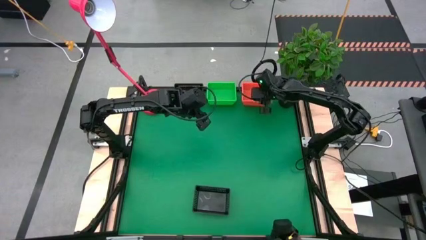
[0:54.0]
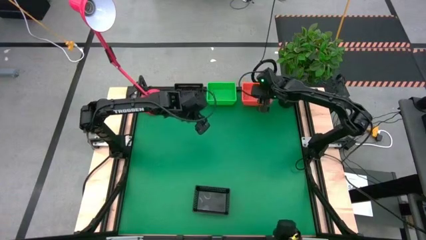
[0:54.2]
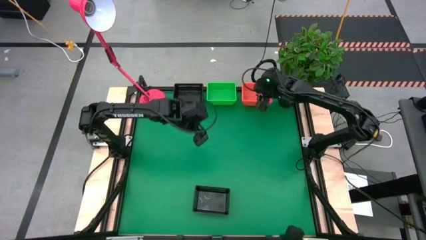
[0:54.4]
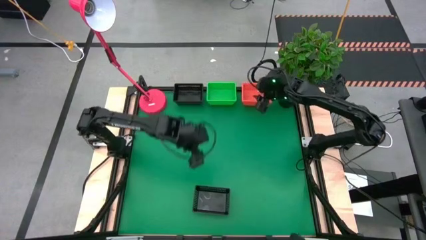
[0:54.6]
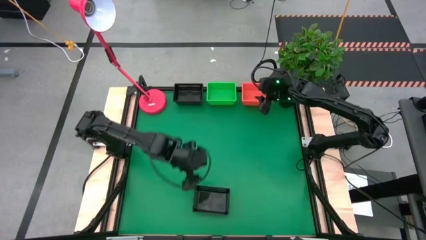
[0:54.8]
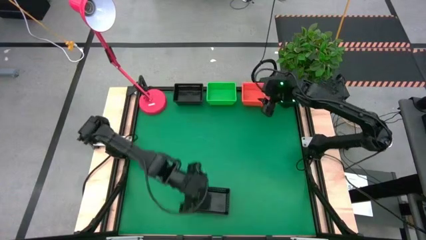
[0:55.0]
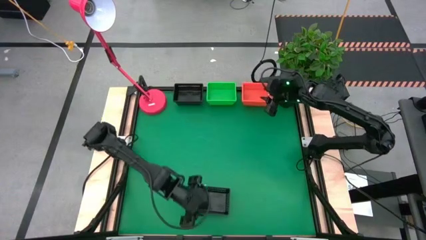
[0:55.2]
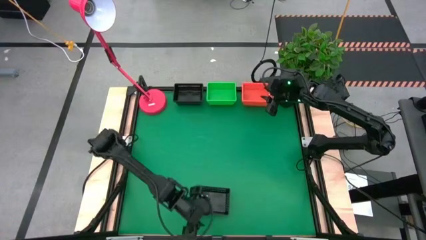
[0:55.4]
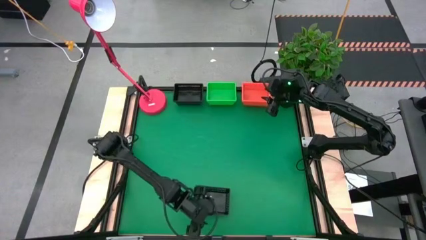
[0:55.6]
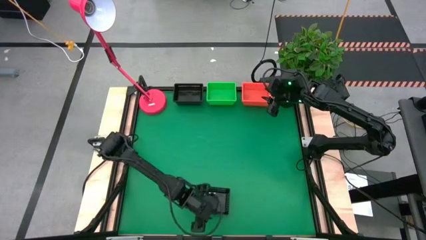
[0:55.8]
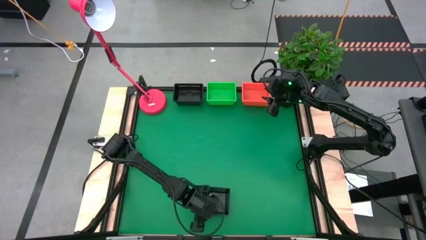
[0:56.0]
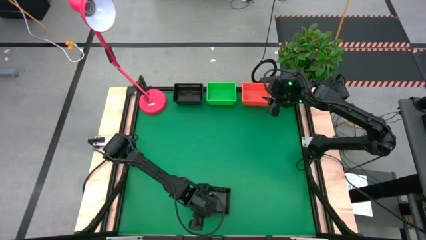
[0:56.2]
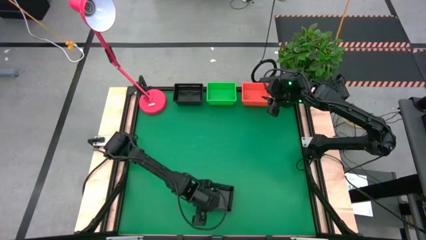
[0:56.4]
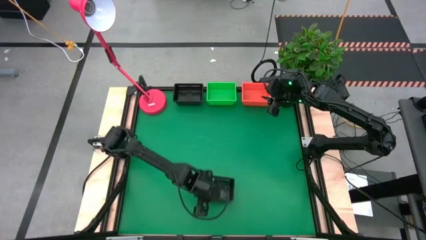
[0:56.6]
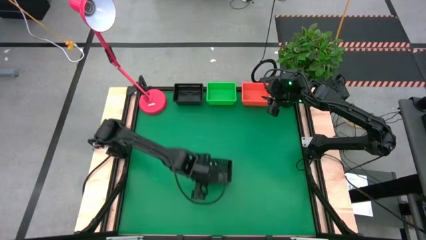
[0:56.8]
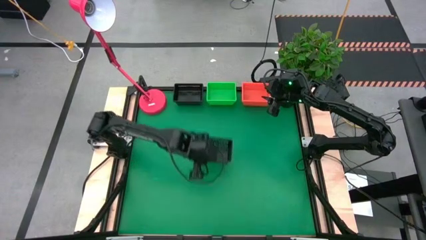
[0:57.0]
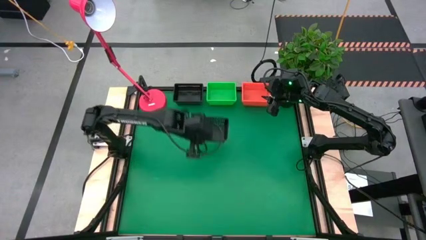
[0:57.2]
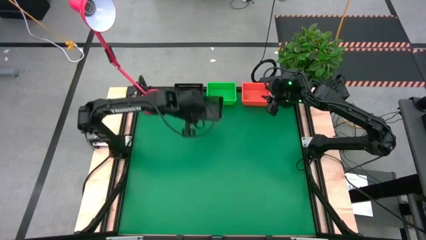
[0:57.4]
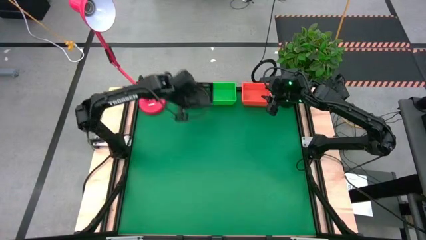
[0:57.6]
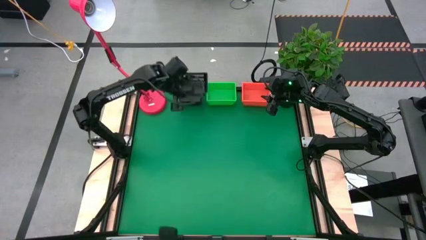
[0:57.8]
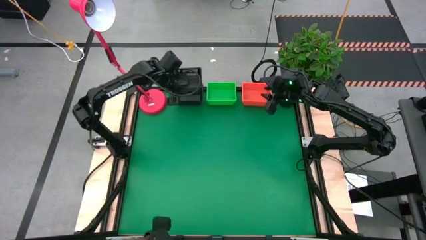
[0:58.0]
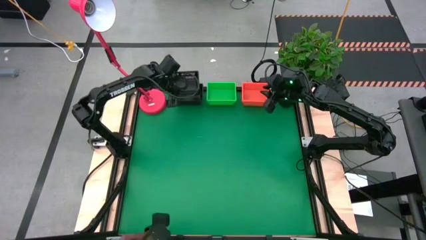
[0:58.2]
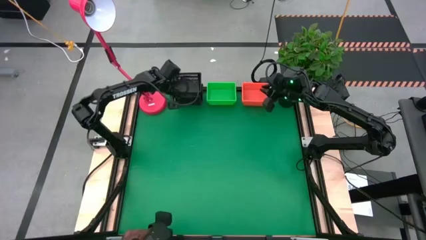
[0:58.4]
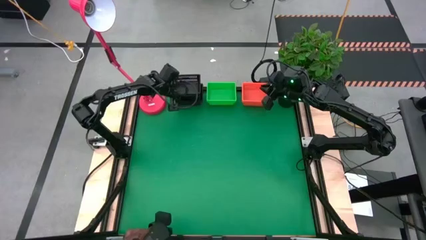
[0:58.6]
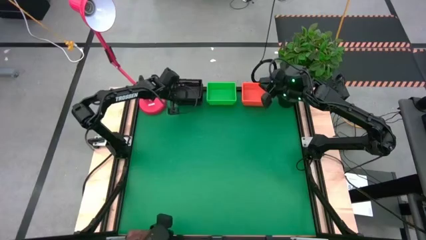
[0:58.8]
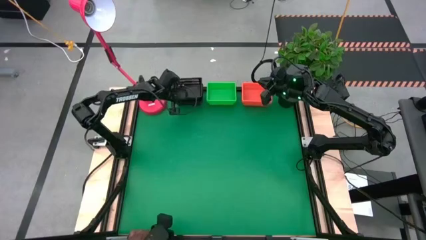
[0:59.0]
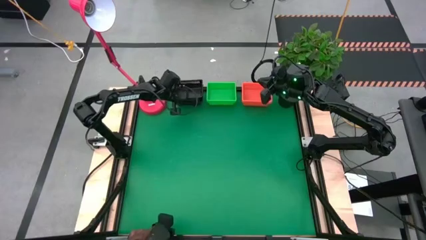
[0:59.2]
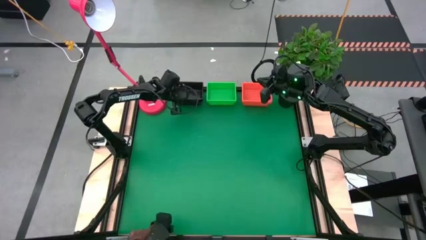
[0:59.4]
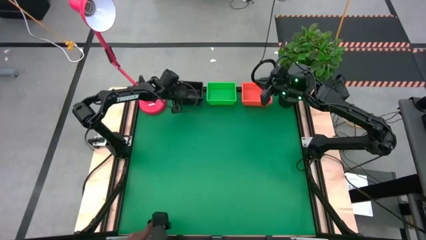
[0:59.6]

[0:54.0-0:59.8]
Stack the bottom black bin on top of the top black bins

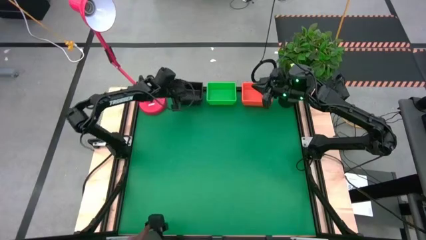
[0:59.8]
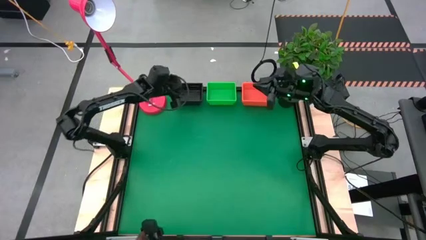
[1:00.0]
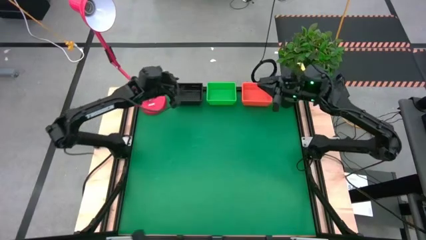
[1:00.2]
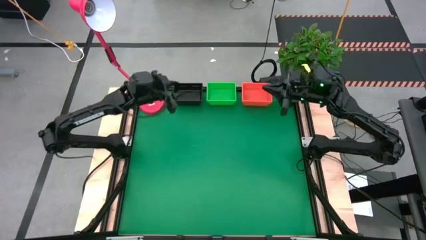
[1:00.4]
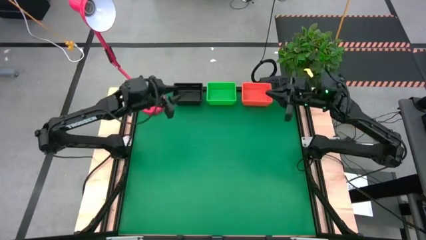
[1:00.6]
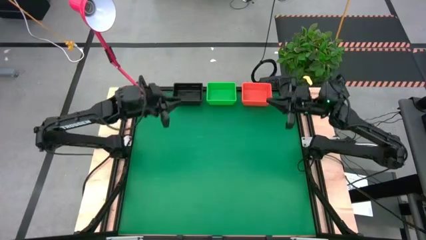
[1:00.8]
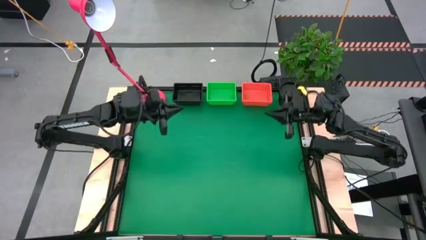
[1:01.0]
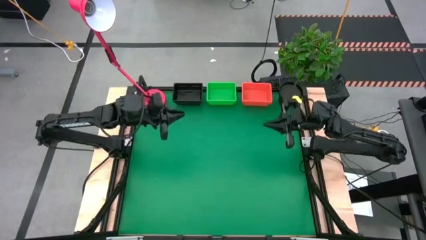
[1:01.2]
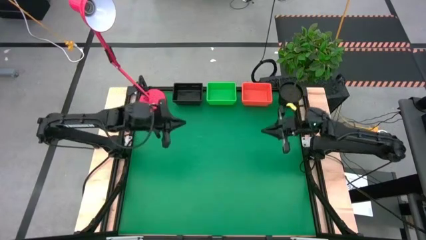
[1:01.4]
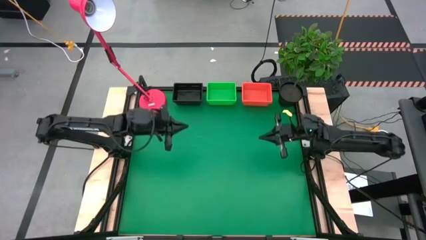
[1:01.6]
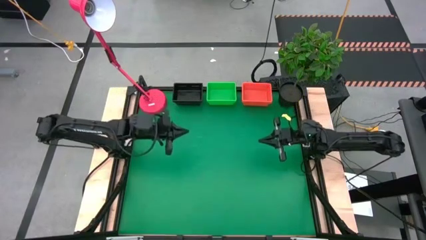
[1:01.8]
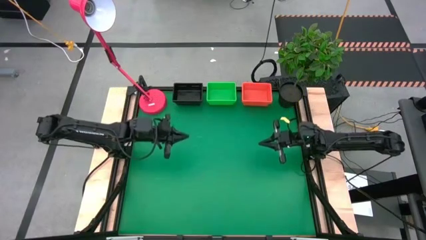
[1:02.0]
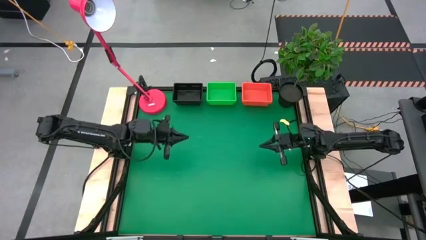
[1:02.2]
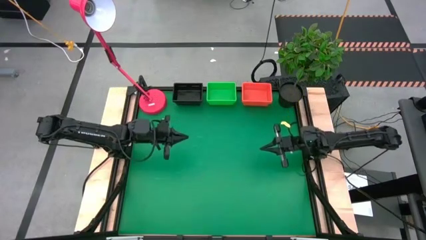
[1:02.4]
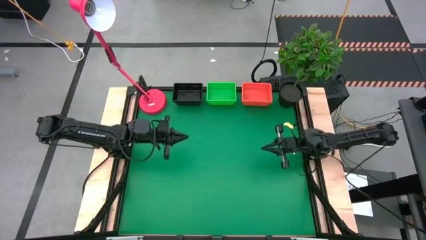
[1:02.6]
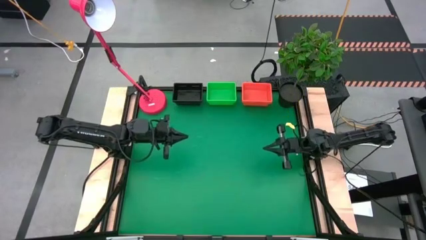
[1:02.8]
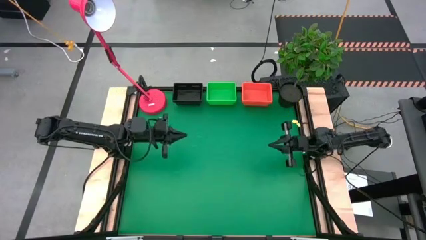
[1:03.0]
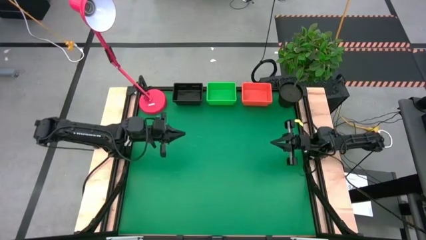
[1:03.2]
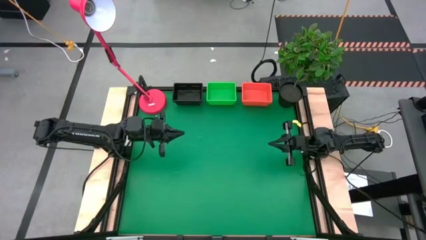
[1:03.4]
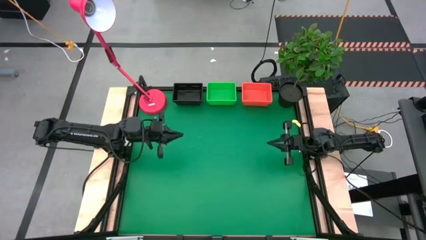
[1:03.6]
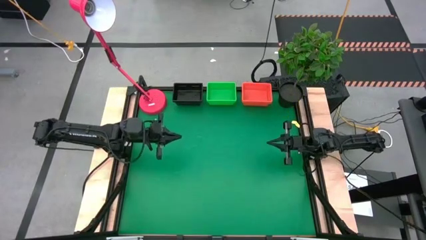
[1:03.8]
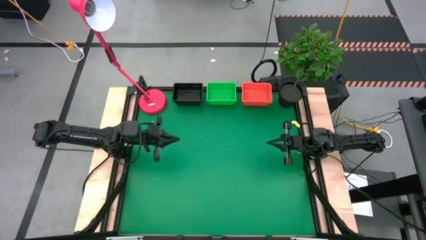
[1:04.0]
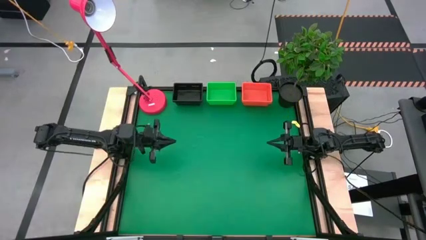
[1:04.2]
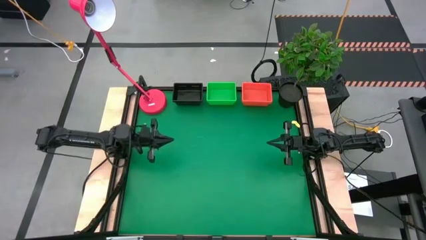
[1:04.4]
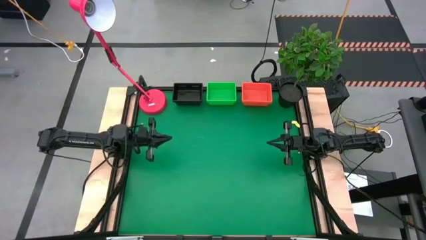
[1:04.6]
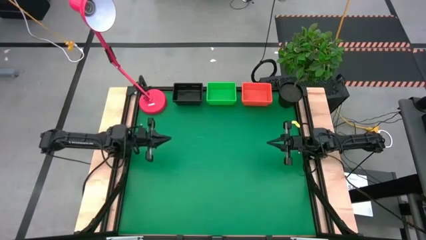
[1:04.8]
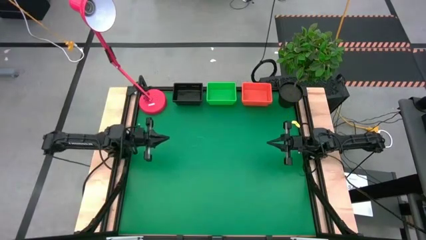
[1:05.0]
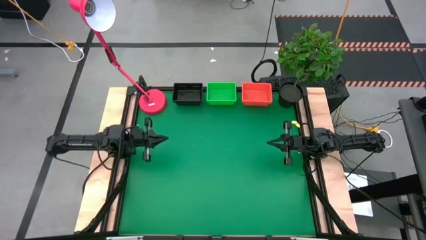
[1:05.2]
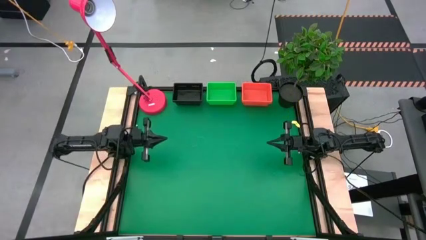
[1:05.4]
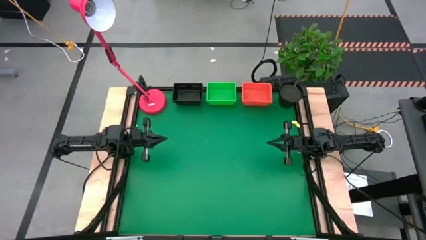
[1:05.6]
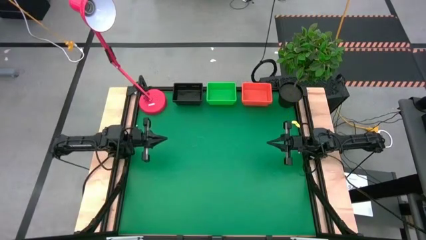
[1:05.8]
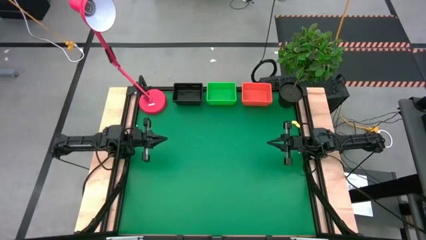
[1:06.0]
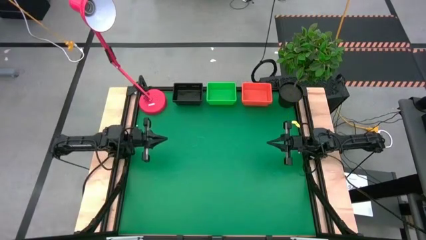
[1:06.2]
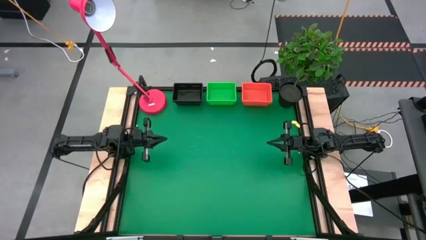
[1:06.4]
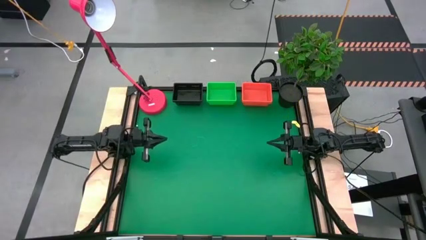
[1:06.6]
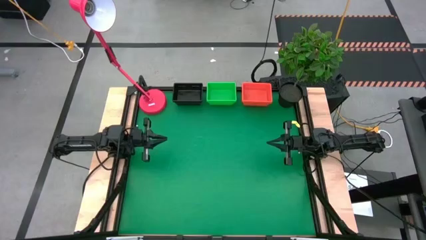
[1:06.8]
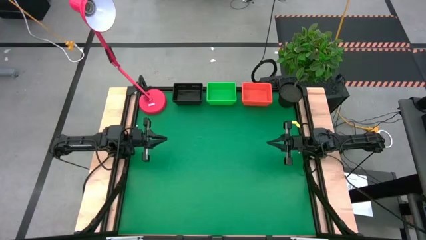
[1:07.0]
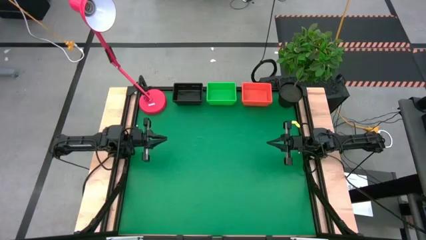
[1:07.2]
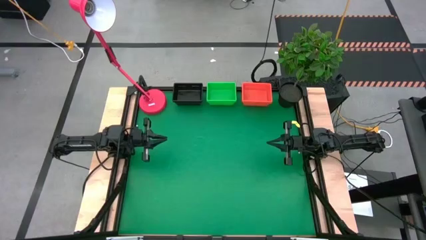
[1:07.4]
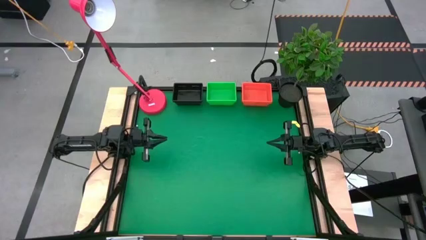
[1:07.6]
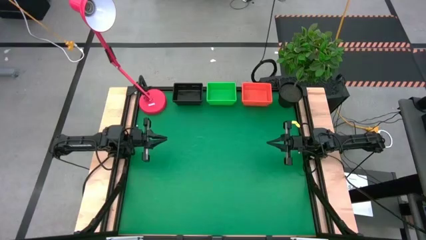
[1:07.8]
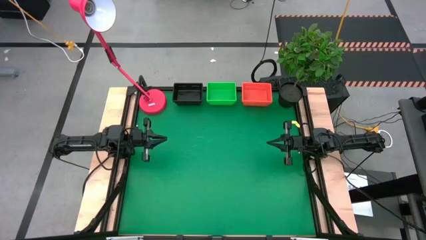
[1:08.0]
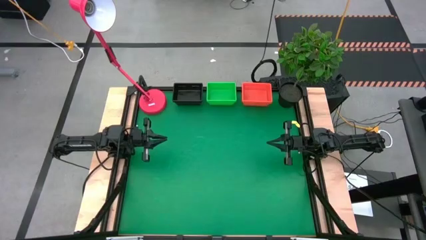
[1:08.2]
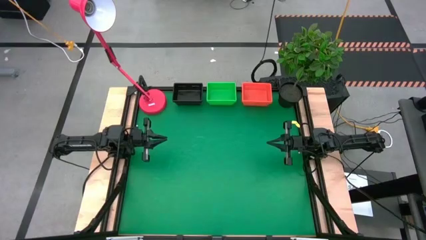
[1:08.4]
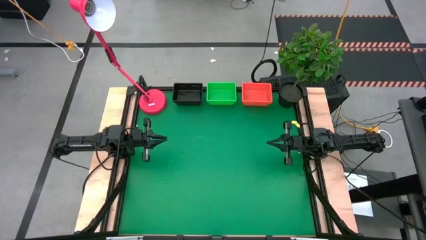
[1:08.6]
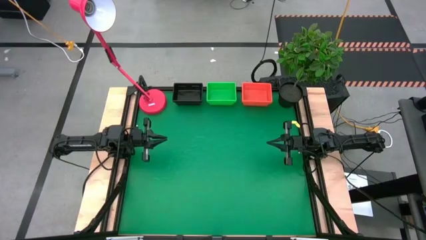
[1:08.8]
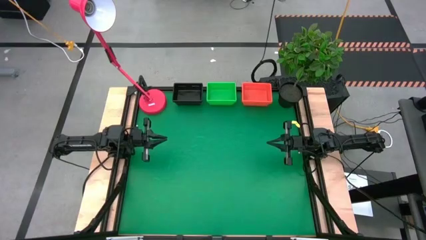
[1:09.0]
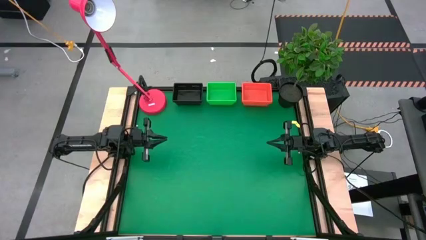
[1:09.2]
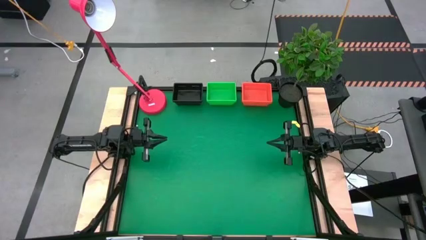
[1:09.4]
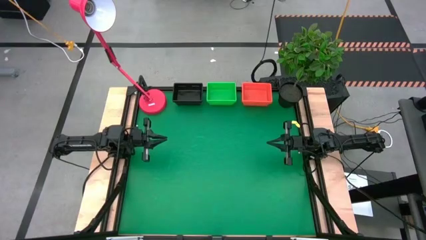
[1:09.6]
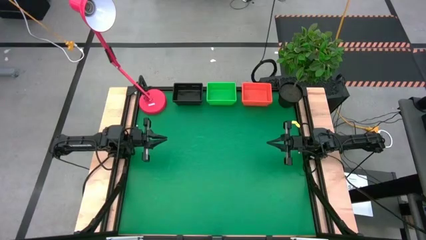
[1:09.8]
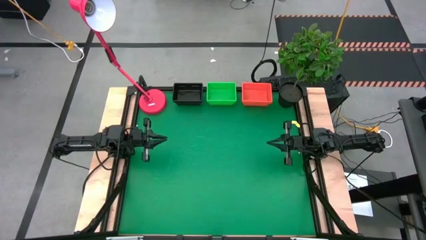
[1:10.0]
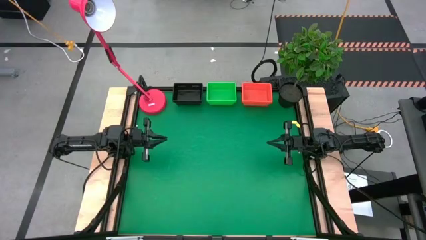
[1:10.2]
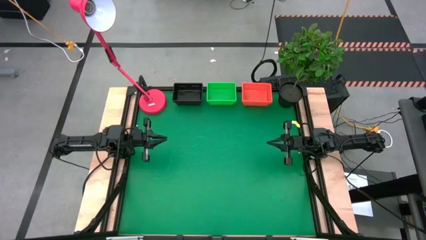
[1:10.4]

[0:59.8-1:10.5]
Return to Home Position
